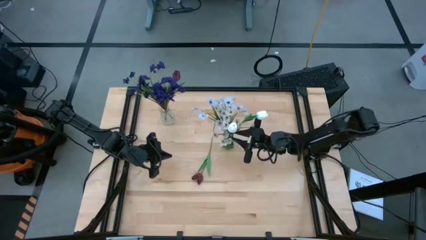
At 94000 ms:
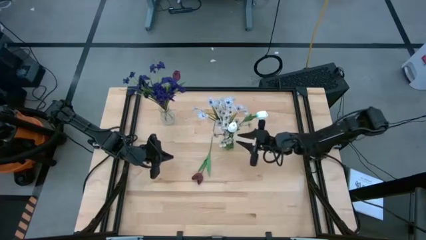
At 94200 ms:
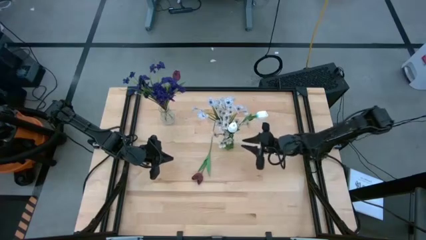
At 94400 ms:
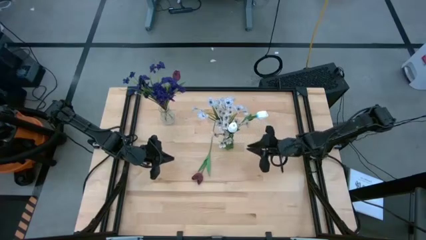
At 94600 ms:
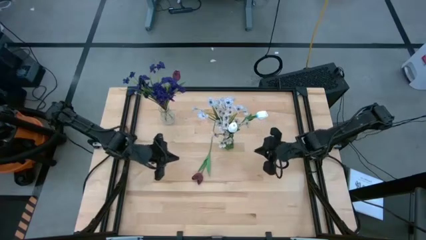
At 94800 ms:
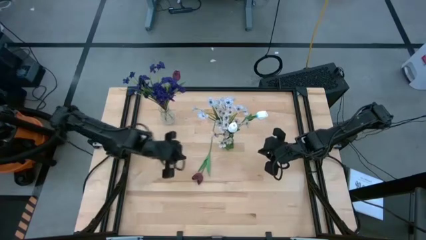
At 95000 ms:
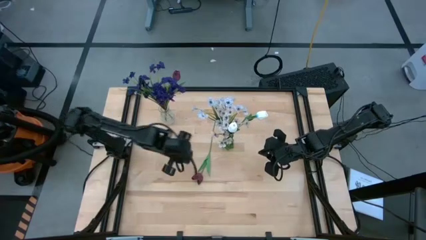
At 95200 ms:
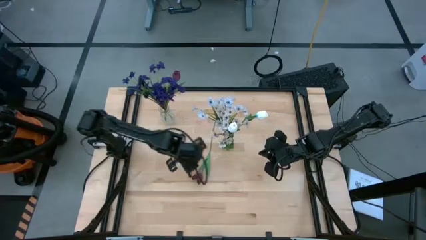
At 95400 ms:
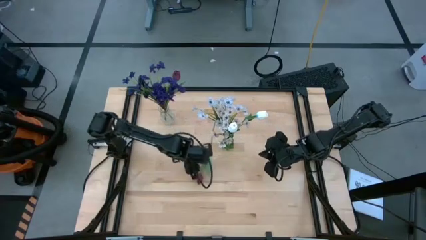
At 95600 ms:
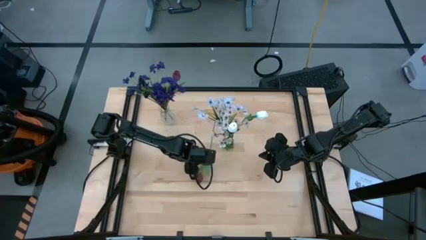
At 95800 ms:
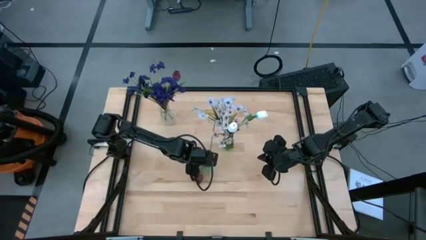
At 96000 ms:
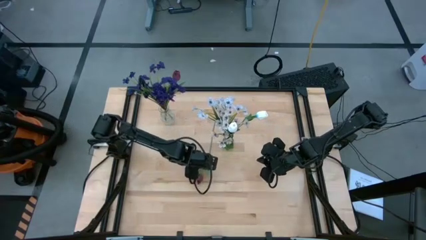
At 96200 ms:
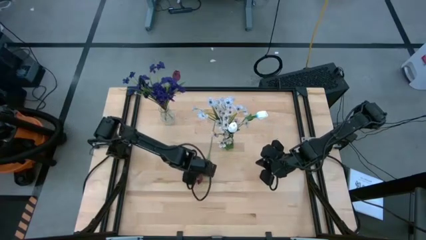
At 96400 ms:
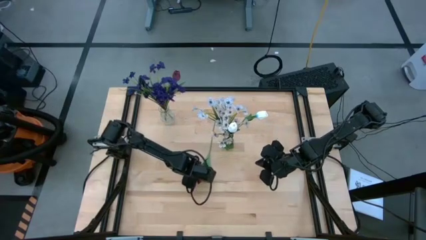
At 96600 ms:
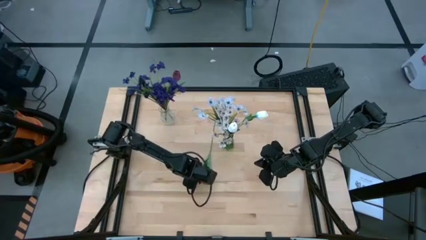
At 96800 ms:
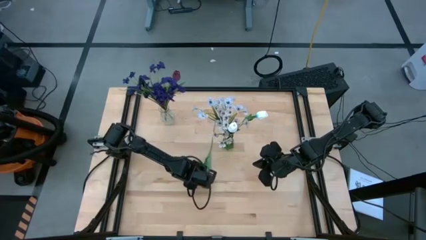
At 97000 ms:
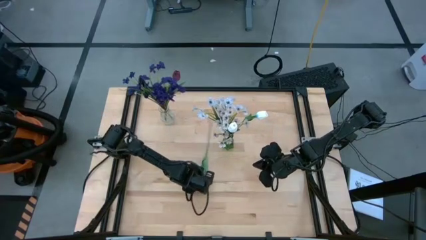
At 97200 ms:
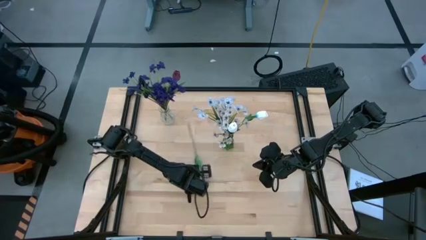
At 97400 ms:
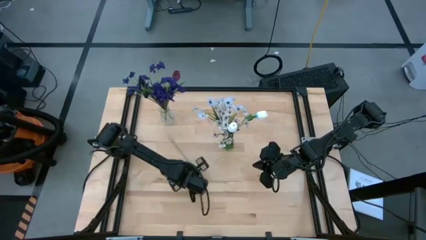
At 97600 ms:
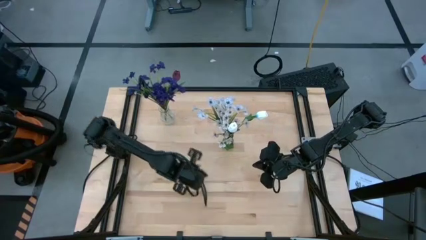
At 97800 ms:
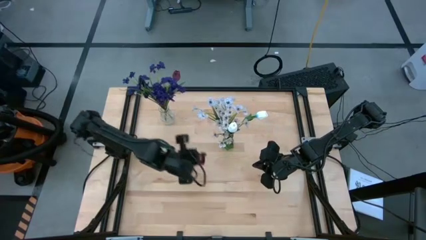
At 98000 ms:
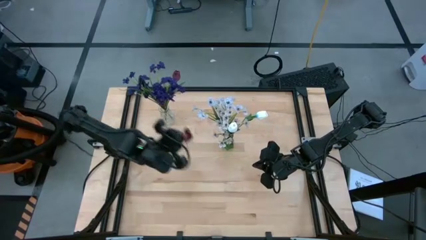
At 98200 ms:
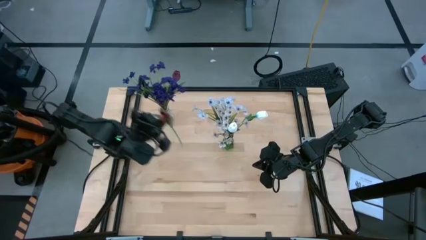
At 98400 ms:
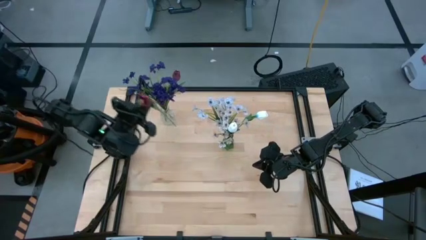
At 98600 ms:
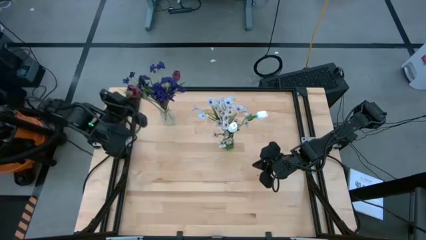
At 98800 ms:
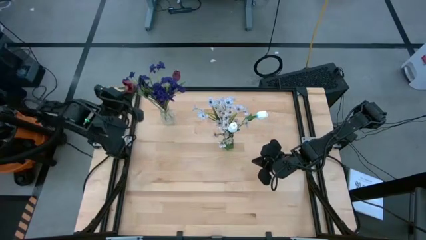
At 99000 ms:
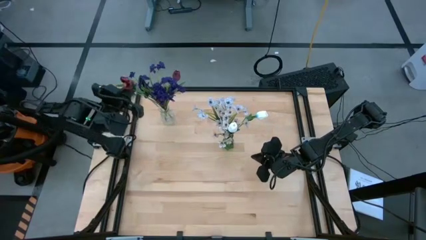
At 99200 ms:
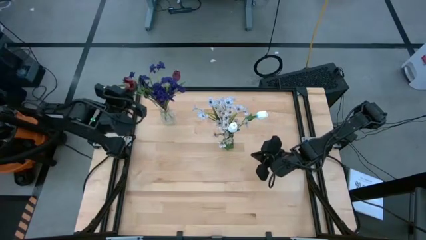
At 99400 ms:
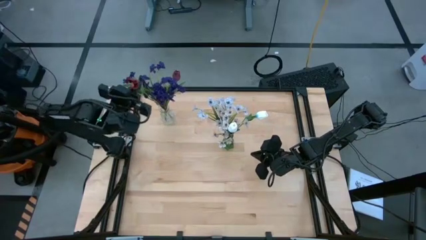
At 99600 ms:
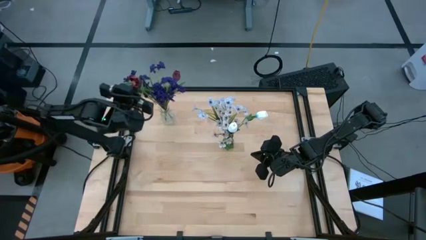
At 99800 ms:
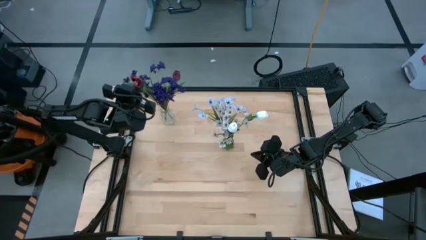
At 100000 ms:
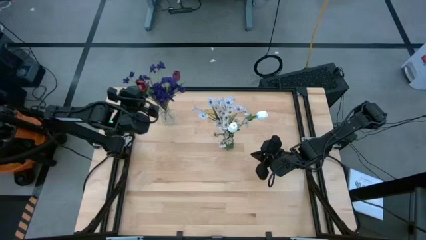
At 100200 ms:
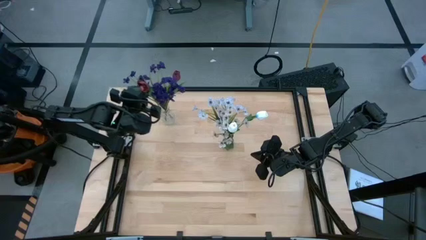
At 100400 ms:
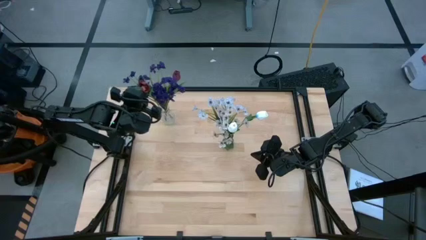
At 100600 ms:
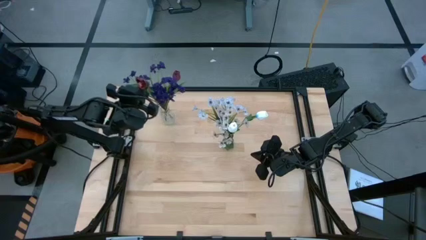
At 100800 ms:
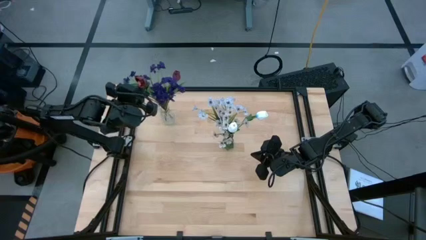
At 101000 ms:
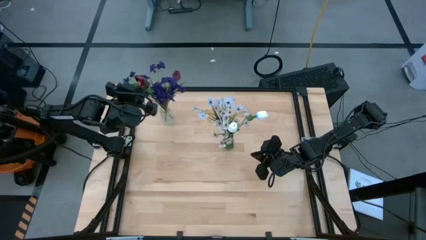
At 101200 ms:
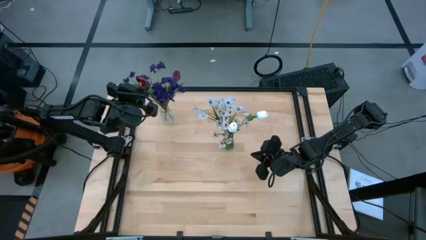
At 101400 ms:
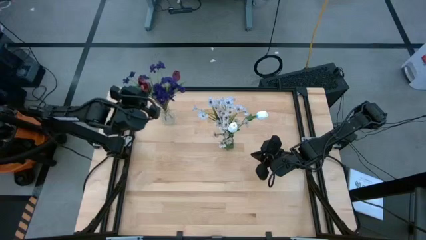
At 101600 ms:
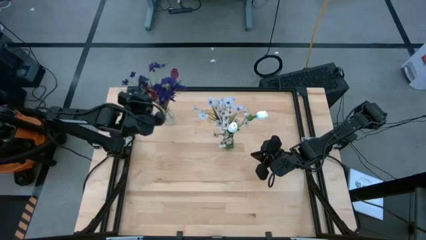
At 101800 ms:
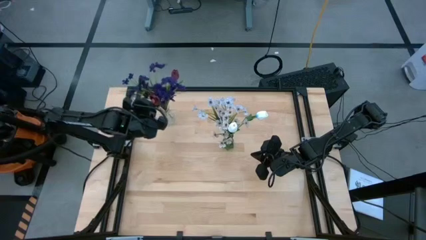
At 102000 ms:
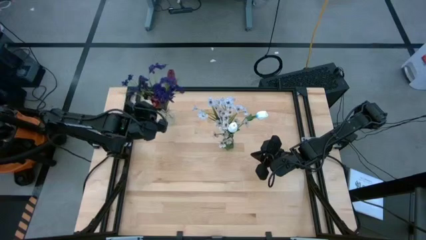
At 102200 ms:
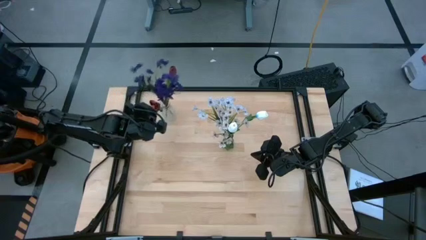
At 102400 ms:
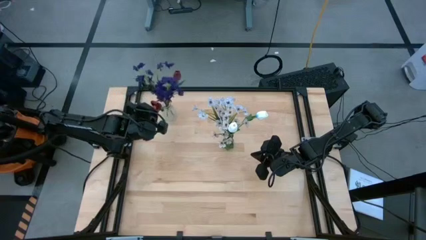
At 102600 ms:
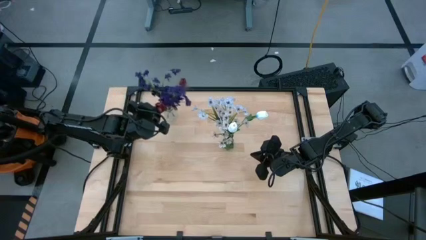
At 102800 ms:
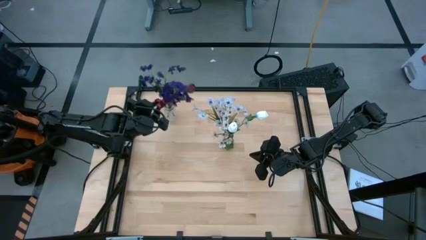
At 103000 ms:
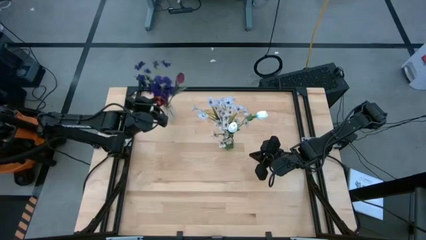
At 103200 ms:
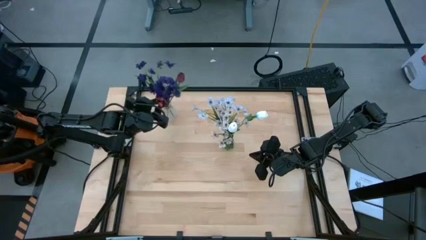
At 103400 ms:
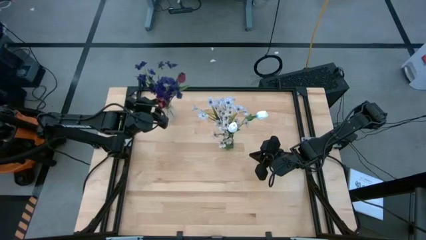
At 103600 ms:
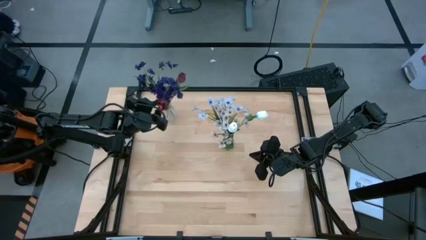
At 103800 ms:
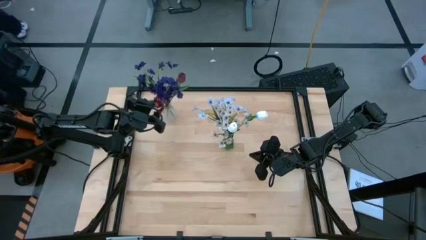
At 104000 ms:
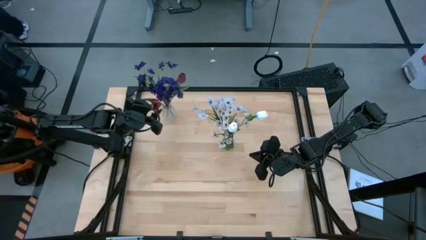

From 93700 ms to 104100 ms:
Task: Sort flowers into vase by color
Put the dark red flower into the transparent vase

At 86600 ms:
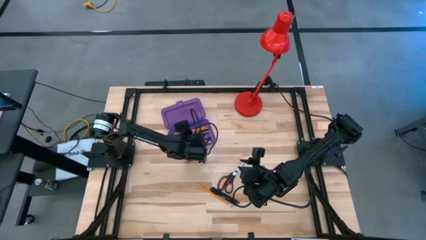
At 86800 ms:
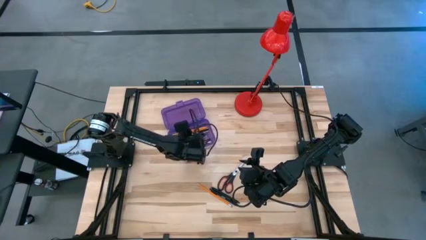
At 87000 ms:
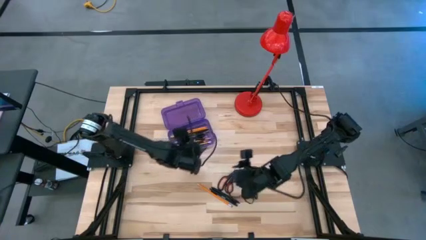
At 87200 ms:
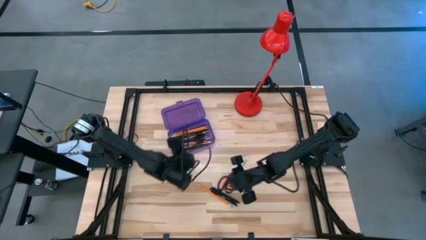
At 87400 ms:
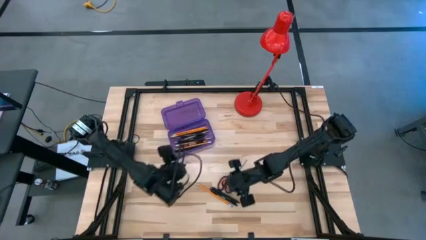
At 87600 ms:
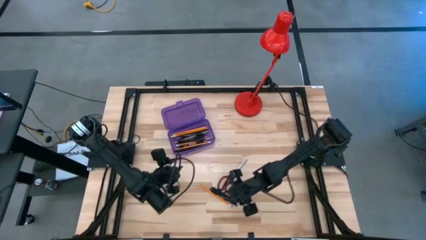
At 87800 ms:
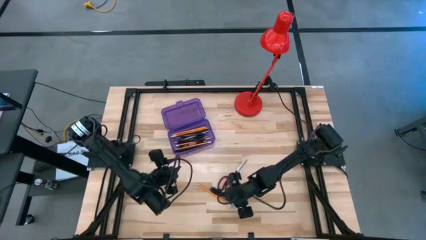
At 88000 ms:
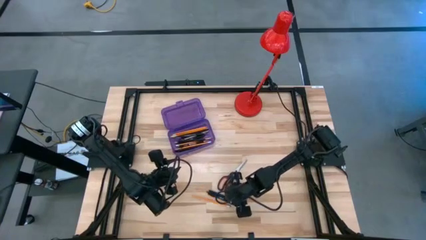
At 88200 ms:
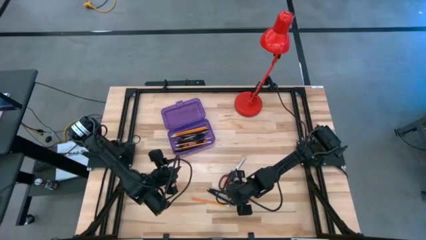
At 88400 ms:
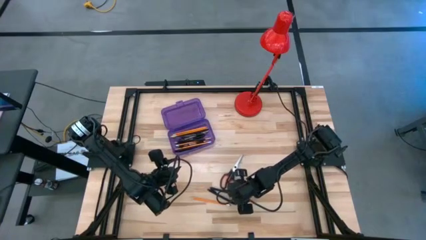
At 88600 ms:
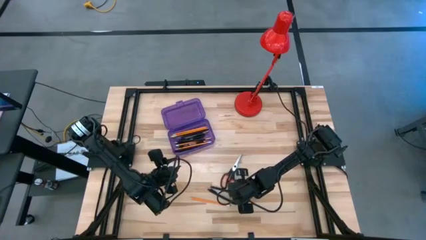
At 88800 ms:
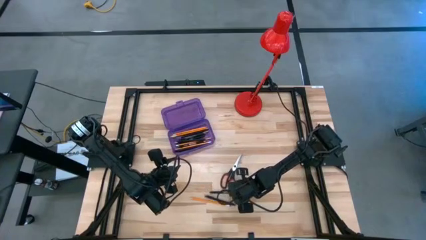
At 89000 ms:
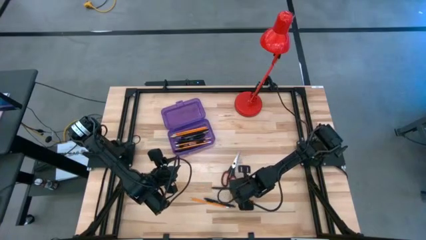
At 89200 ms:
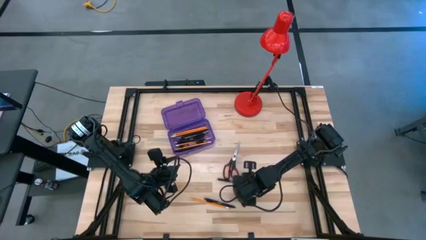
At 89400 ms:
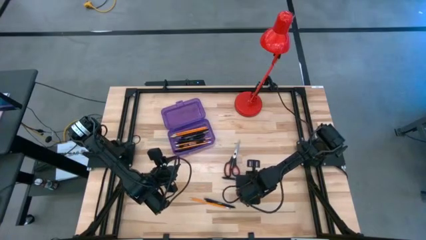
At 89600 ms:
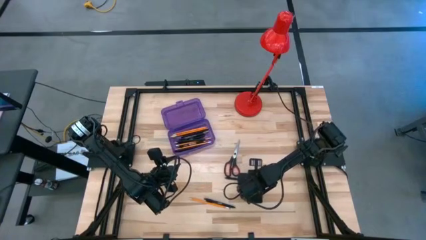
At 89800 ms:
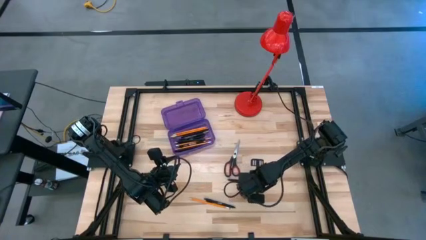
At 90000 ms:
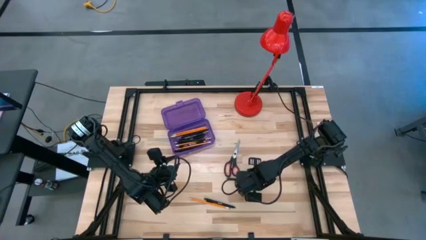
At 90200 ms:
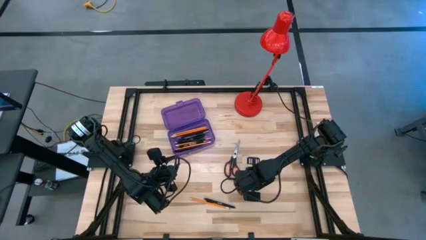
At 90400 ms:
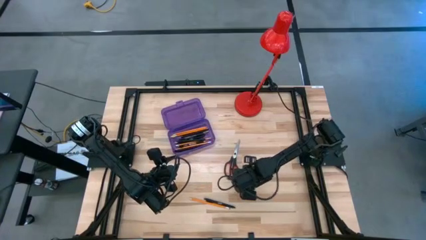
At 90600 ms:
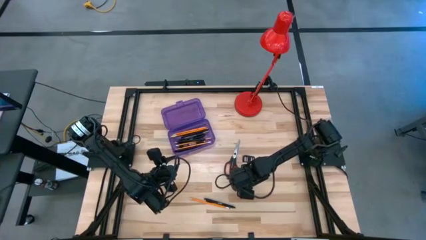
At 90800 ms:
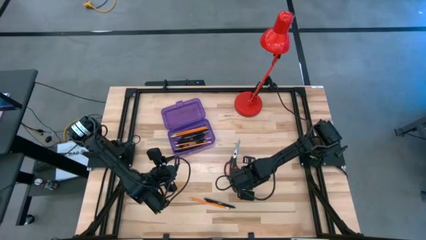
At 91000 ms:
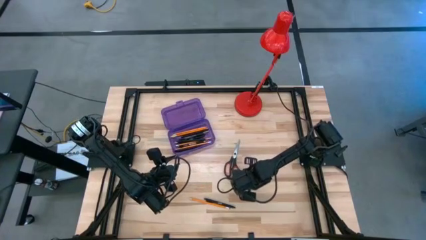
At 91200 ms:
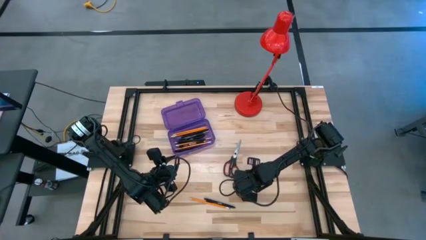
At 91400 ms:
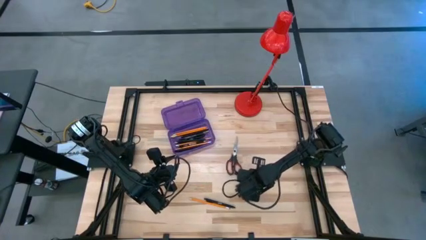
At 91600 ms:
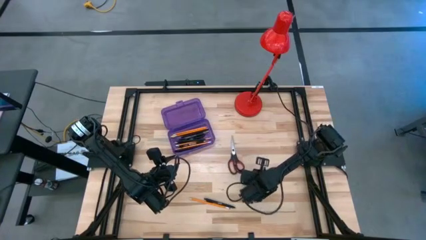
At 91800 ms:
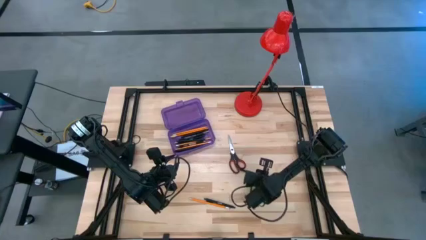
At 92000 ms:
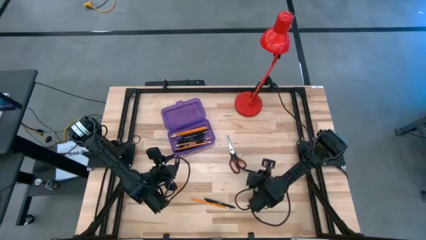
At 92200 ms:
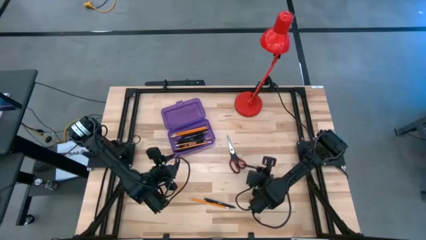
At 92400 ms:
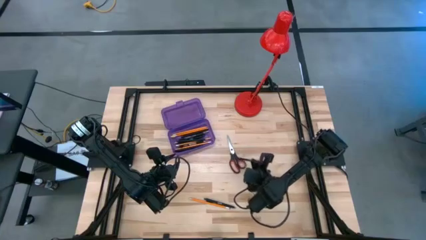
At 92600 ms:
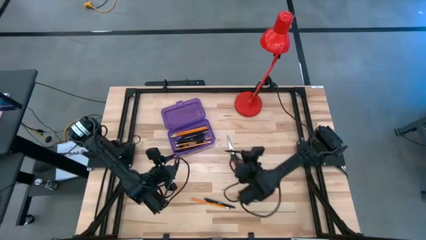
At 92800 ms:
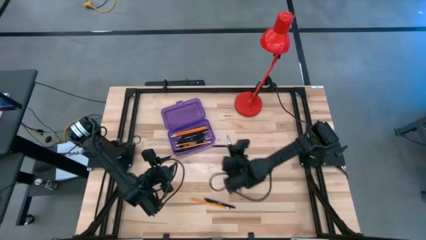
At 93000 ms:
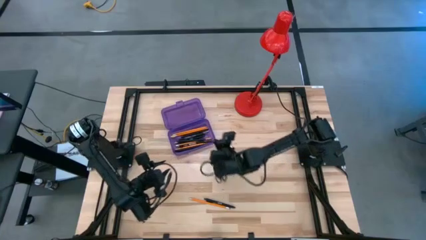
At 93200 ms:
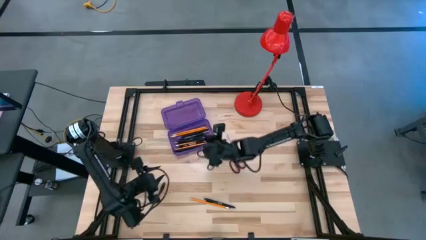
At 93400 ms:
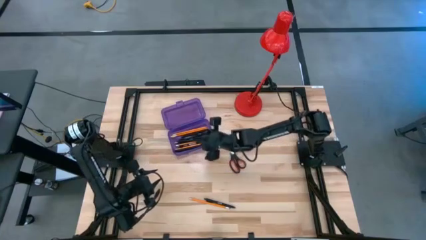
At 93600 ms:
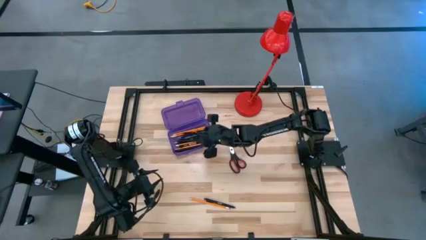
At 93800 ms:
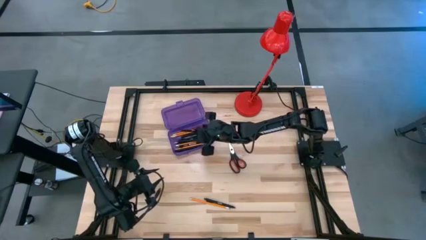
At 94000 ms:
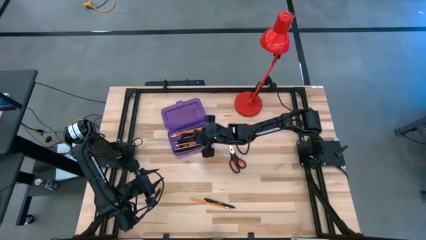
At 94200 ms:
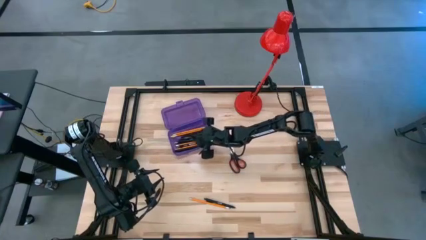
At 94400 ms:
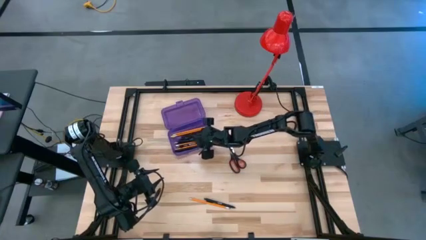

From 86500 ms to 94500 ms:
Task: Pick & place school supplies into a supply box
Put the black pen into the purple supply box
